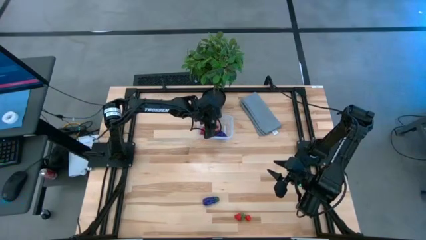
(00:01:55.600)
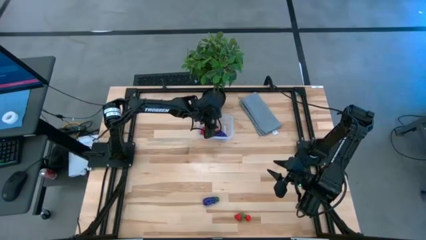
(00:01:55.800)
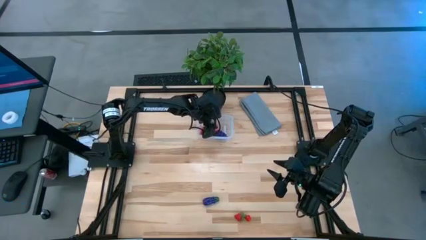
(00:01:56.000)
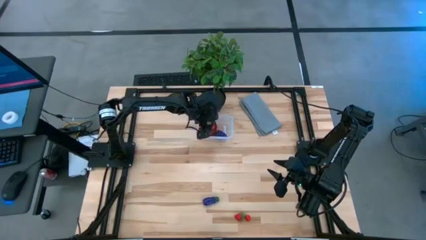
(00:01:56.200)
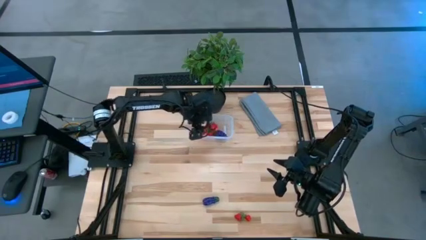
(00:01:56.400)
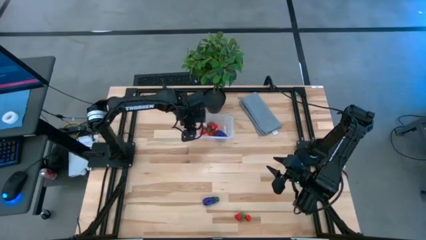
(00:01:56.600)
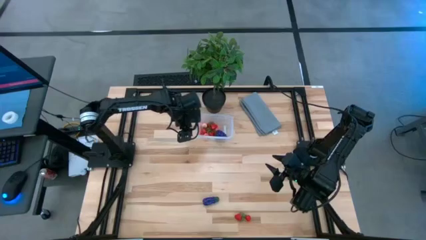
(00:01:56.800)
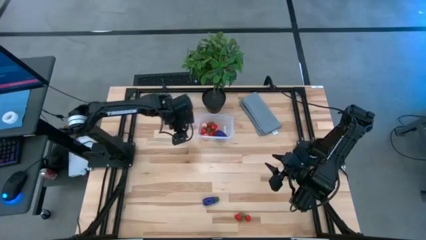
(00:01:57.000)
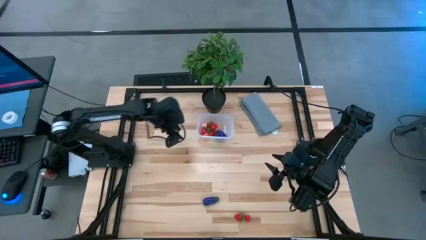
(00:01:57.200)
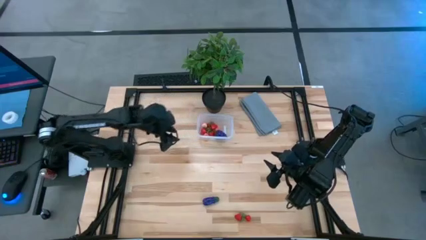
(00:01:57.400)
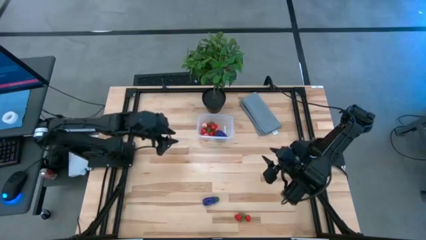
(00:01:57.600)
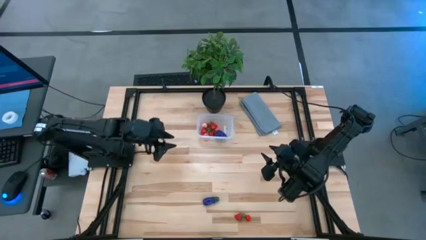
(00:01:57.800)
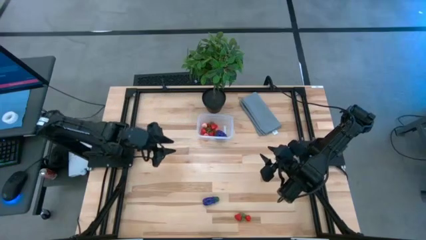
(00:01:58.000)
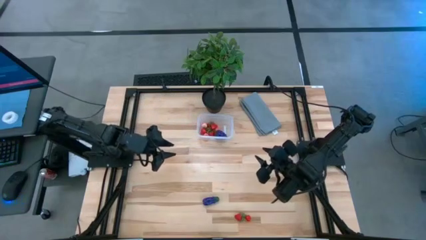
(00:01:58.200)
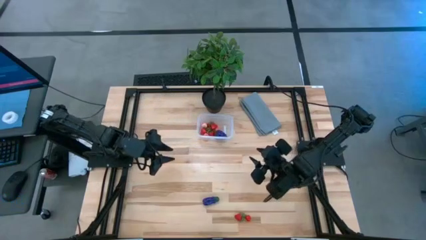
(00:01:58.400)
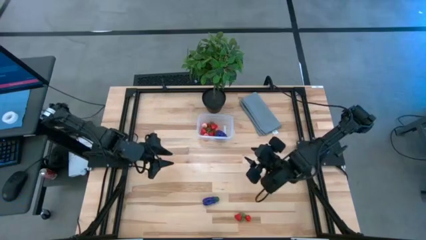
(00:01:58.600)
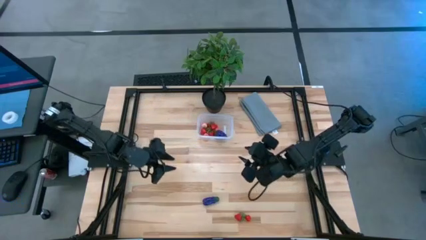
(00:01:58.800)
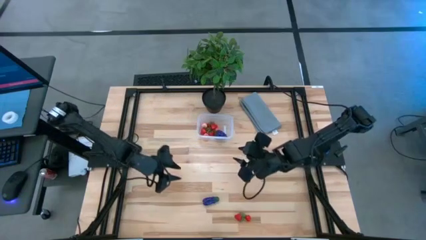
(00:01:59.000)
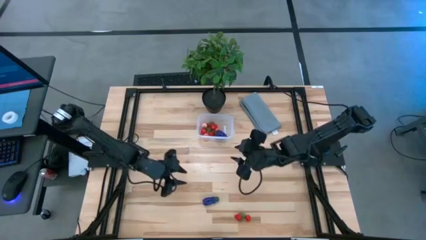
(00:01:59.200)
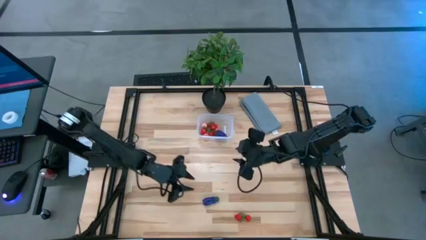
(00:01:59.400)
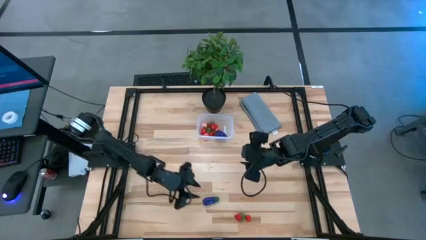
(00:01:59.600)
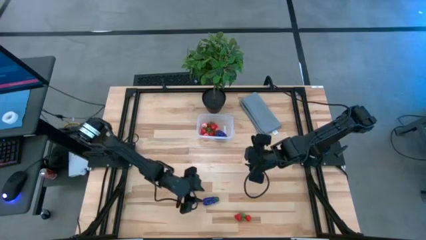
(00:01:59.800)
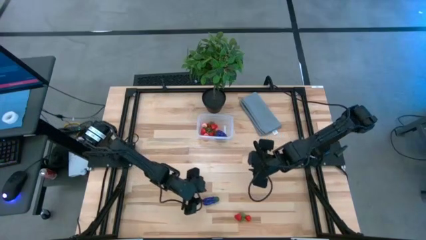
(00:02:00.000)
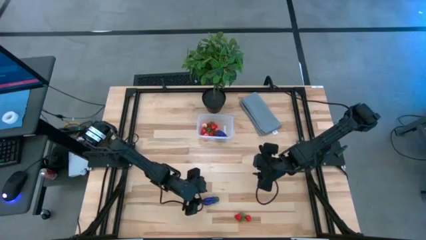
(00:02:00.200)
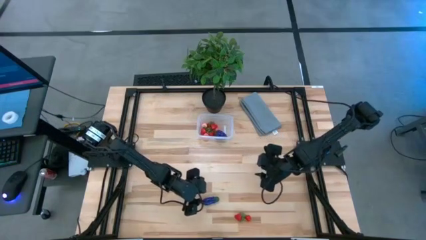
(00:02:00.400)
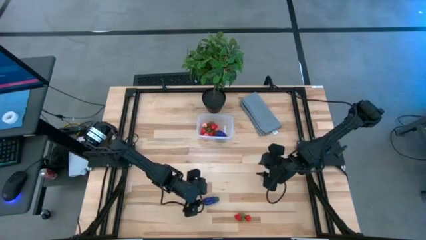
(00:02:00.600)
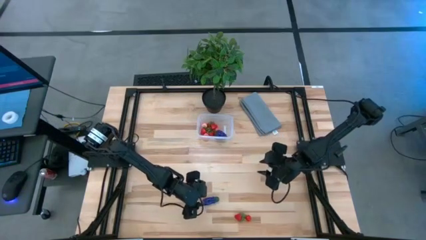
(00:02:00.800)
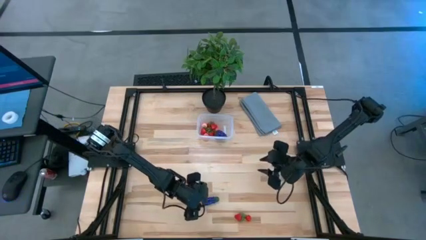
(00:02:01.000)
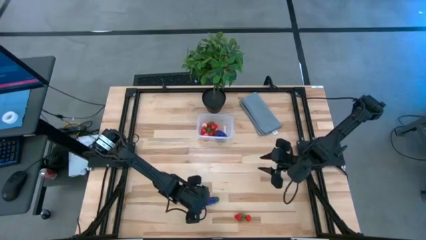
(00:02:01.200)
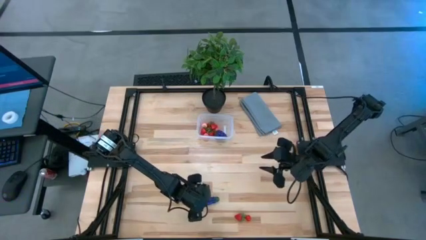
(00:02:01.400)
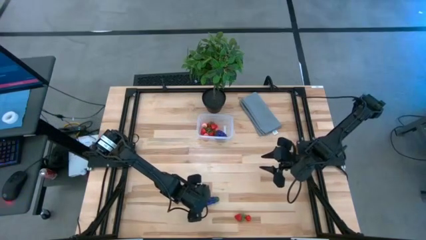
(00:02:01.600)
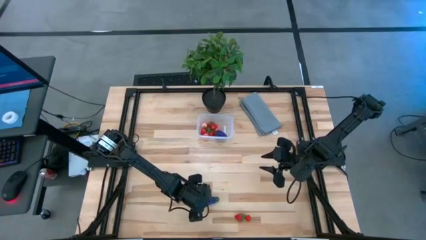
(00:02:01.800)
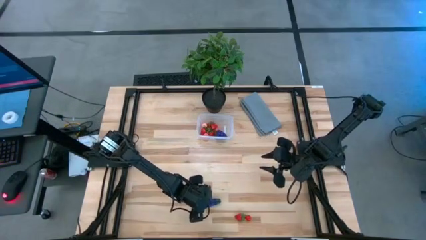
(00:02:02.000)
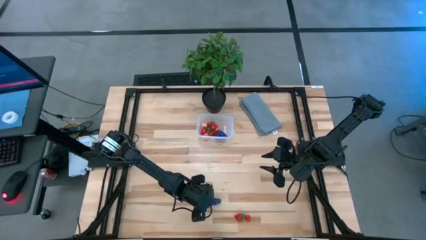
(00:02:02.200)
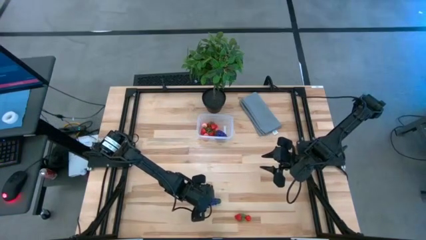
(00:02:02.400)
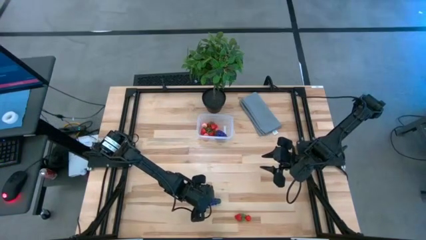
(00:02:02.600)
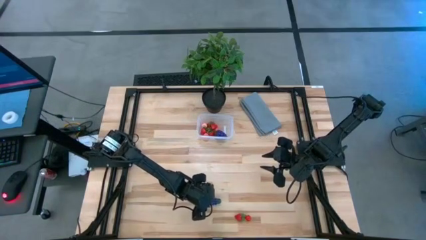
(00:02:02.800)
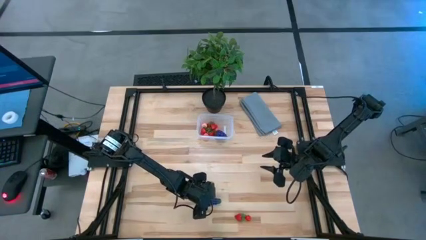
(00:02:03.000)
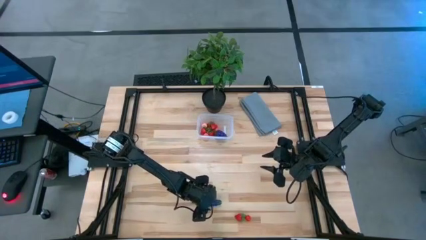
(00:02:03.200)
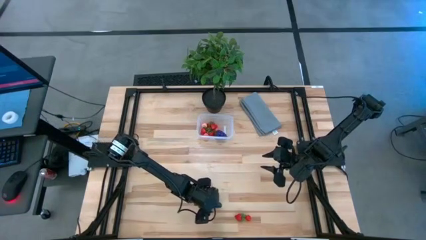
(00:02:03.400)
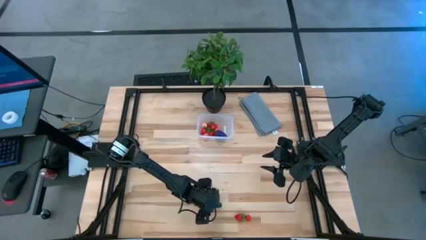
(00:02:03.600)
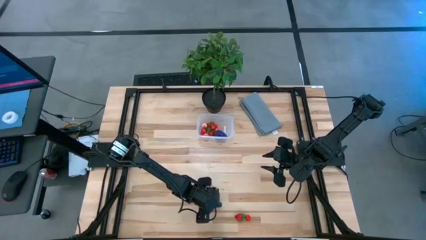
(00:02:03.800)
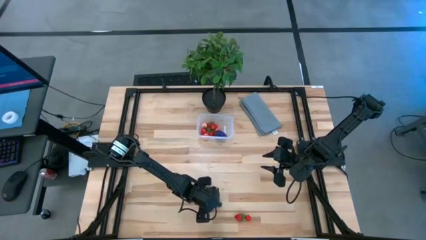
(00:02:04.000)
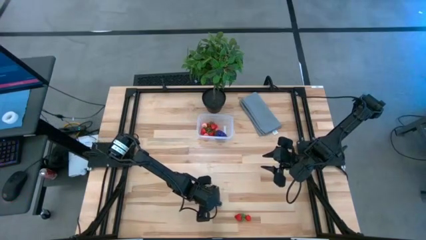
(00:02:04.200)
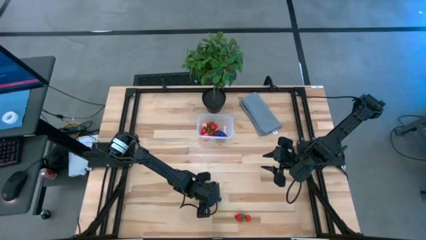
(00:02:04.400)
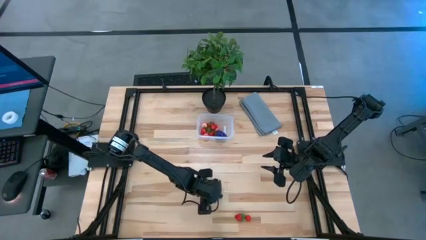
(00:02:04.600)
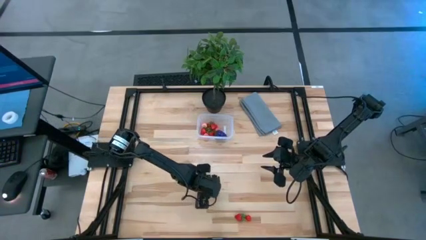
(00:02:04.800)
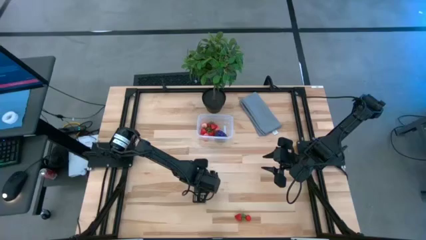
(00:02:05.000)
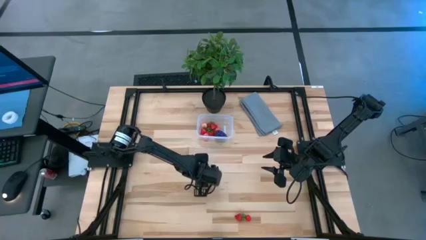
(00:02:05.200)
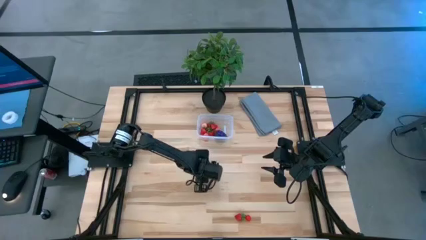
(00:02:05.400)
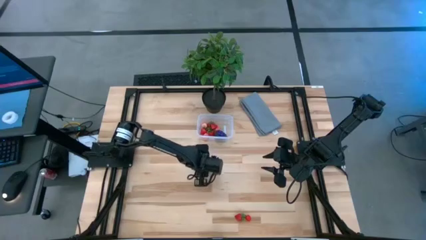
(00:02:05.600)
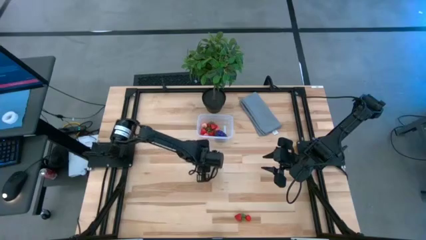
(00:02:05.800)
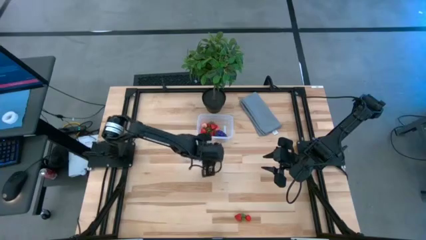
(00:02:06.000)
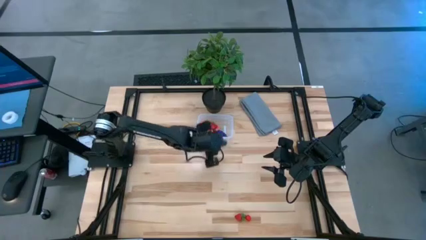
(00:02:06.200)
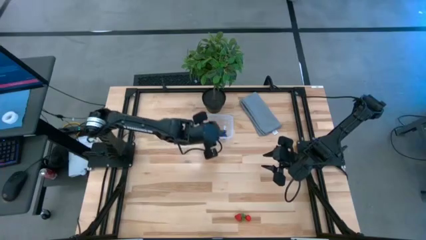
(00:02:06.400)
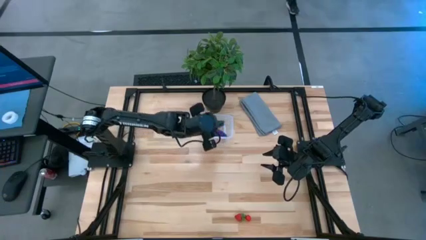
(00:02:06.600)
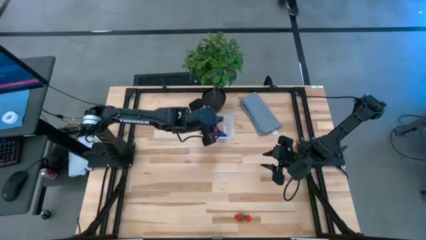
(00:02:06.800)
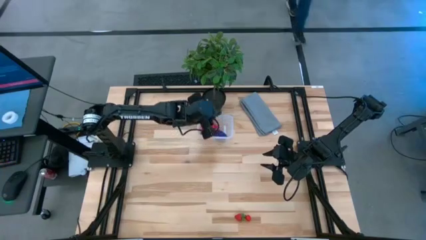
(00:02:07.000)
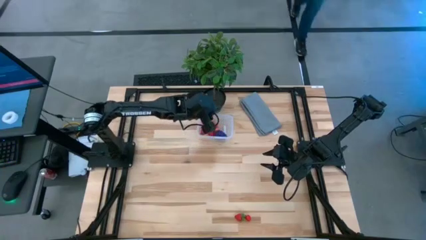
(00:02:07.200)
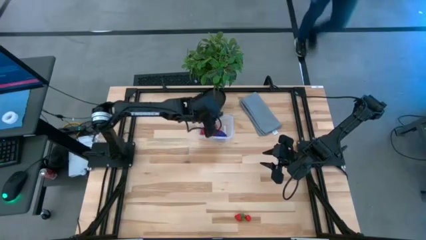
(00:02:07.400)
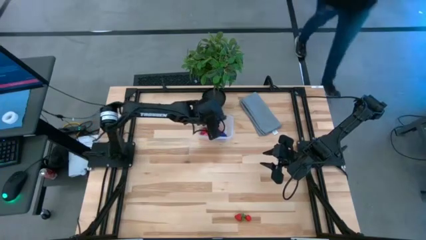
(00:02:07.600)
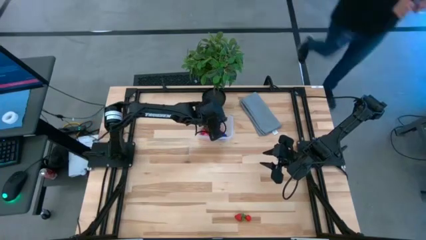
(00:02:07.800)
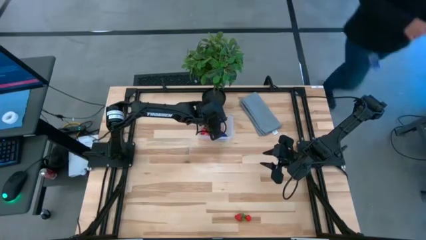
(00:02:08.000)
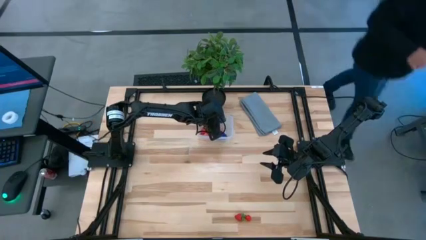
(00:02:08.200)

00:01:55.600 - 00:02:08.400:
Task: Pick and placing Produce into tupperware
Put the eggplant into the transparent bin
